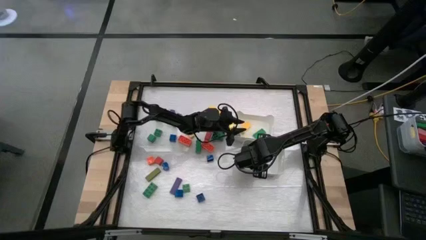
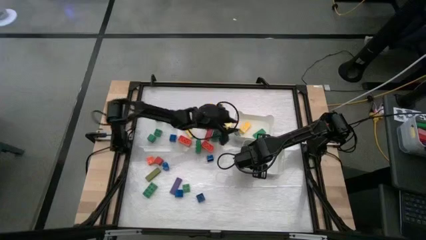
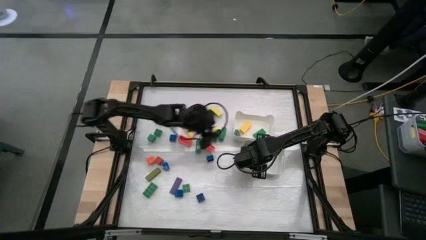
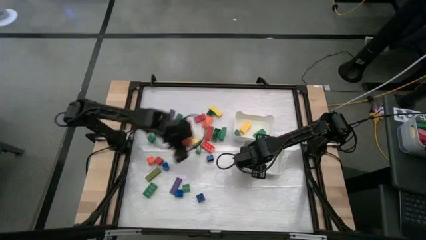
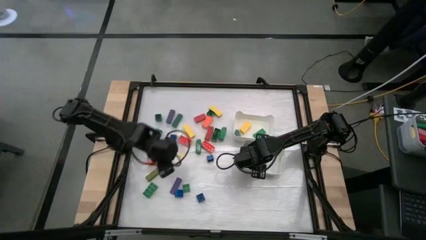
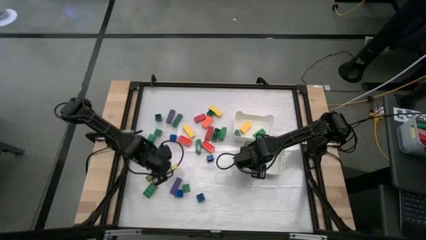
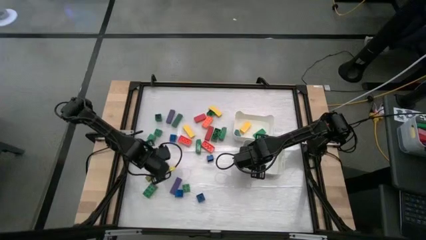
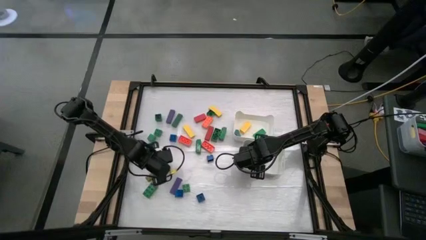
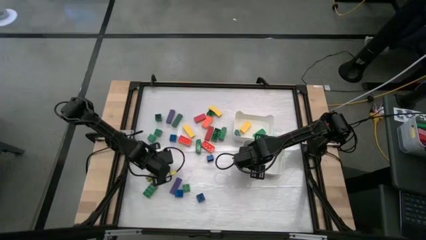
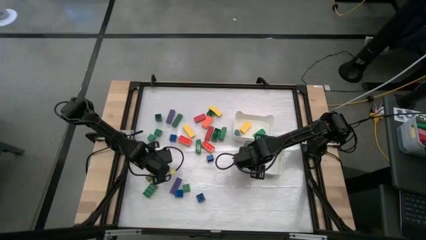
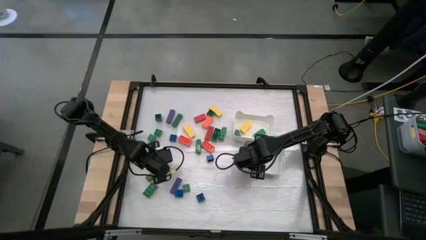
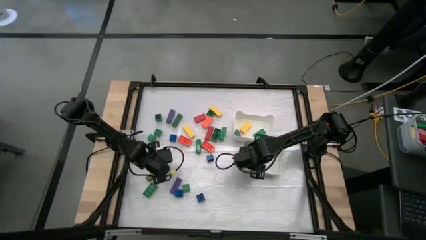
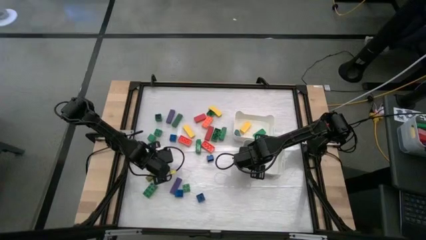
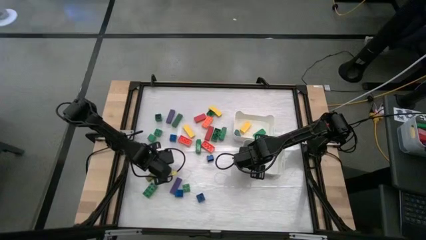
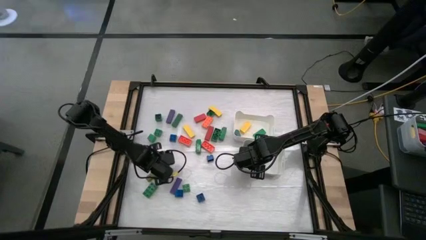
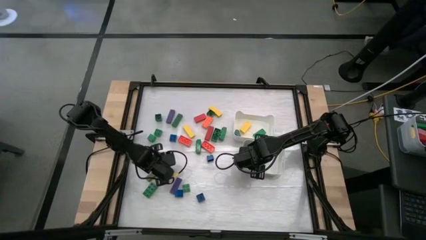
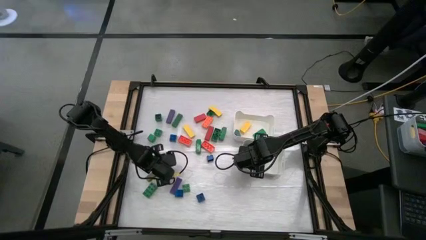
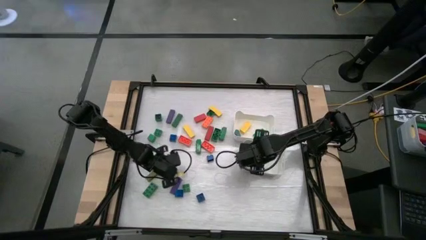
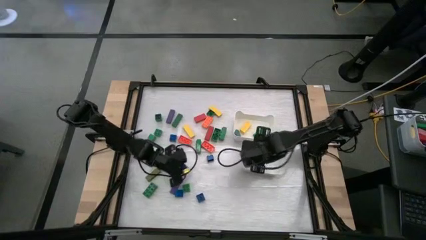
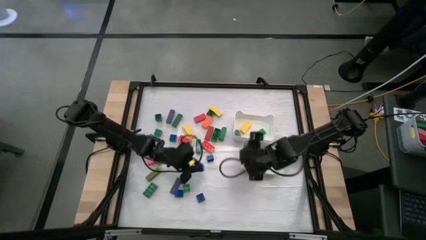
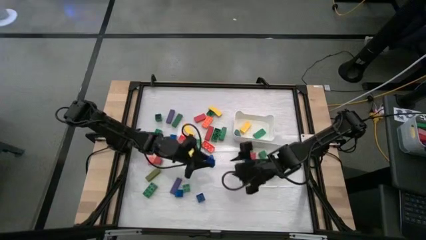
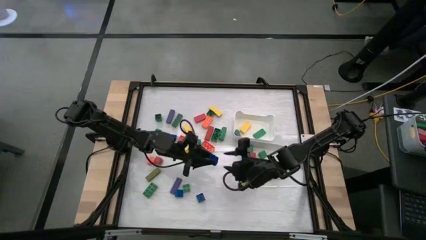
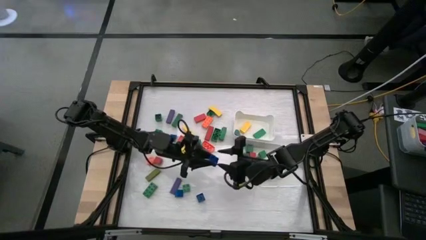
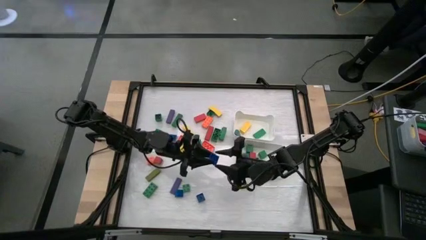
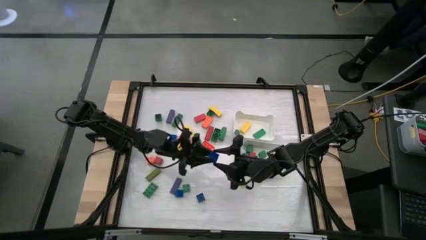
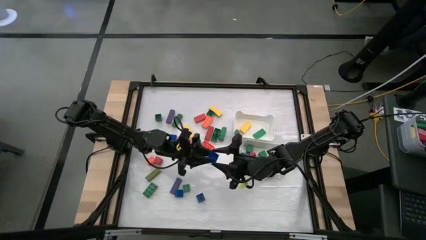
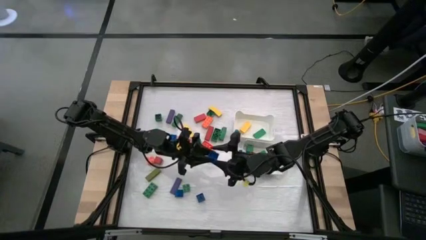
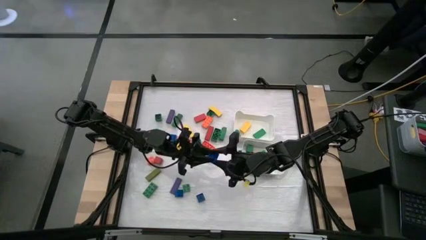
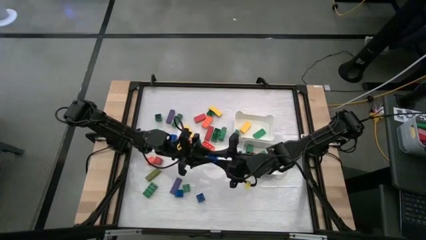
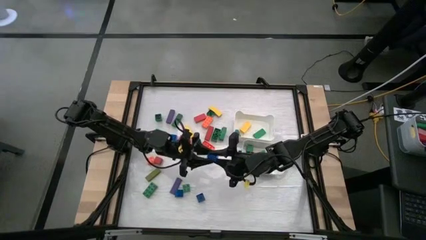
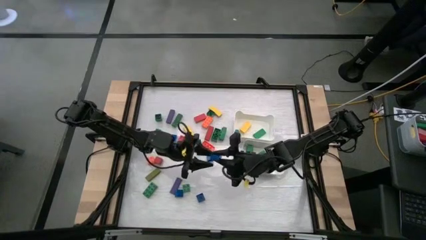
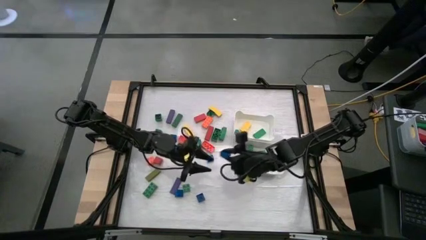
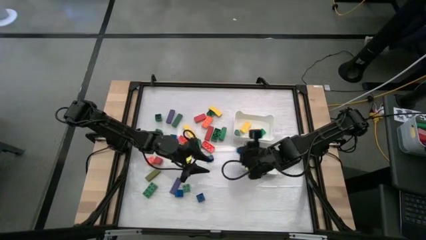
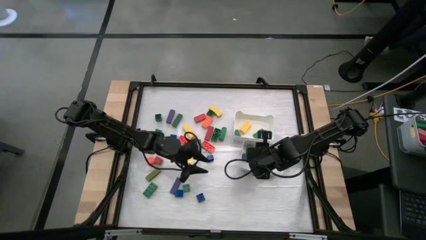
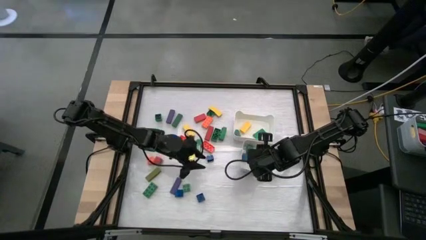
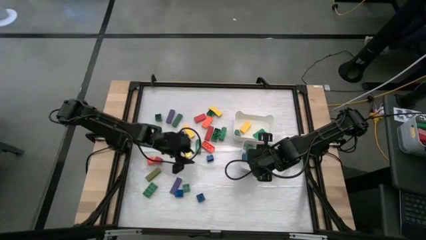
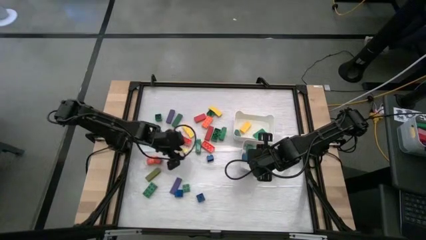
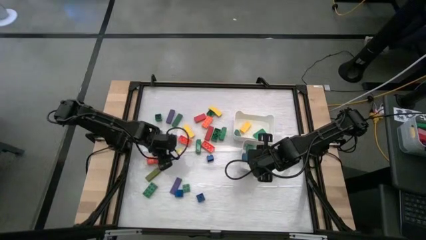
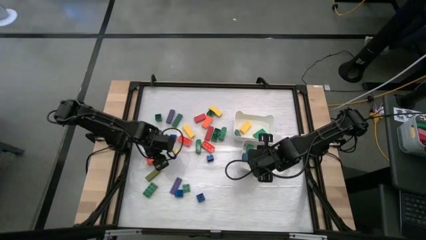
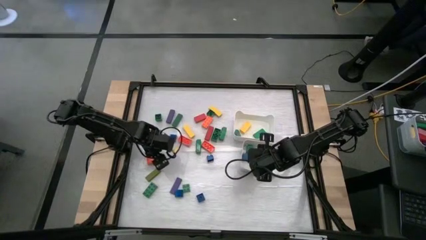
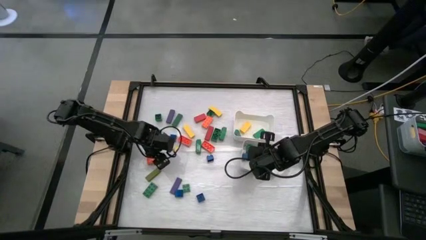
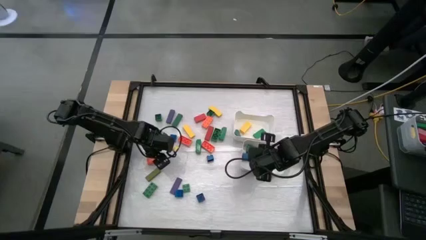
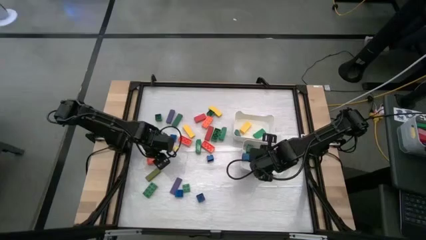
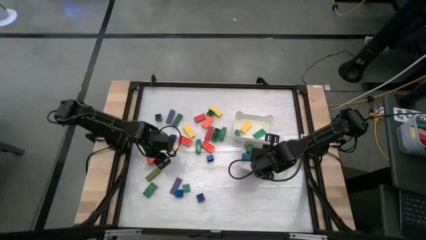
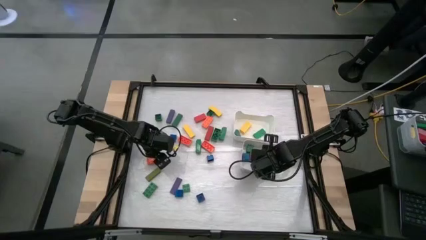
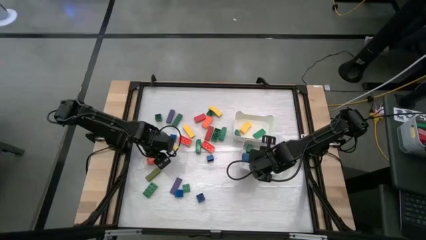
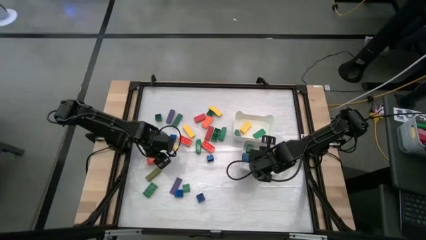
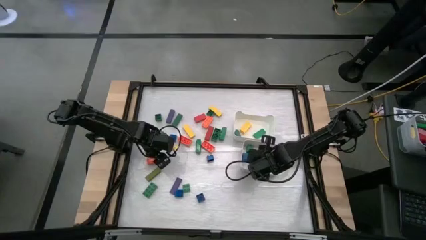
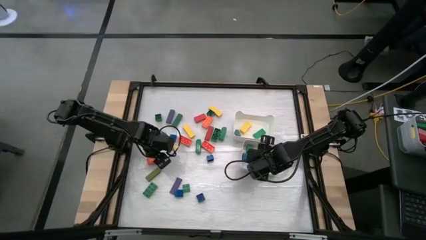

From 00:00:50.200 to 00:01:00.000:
Task: Sort blocks by size
Put the blue cube game piece into the bottom white bin

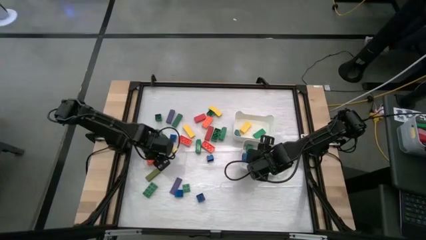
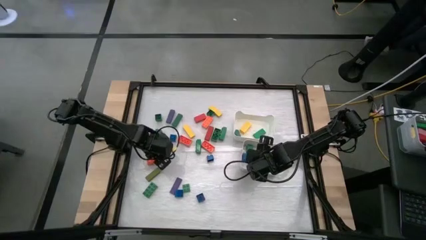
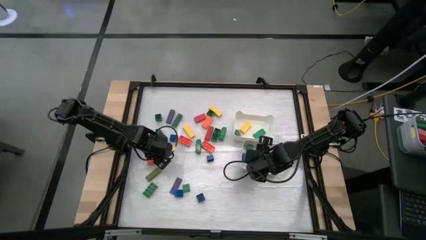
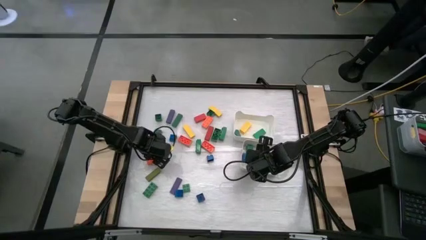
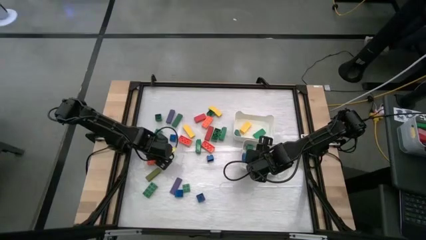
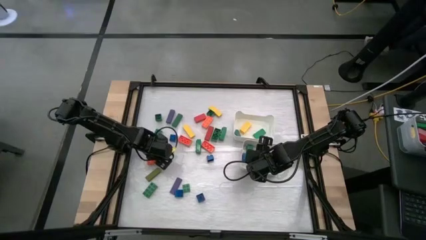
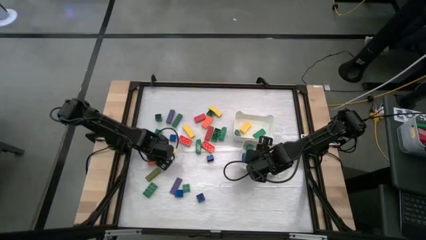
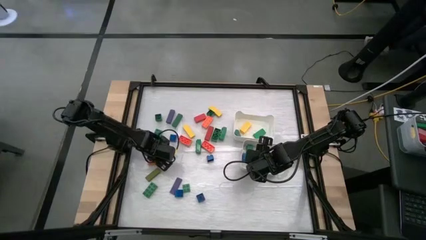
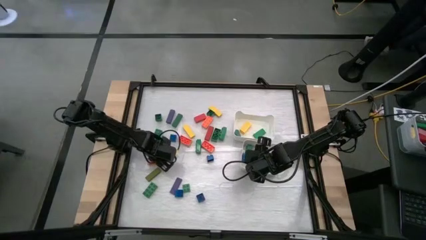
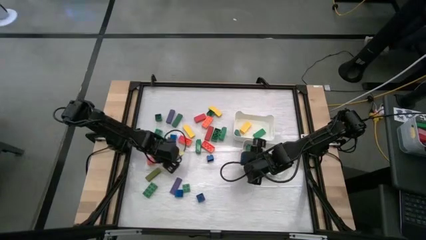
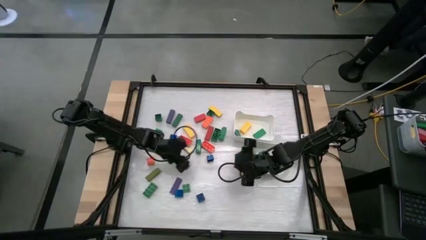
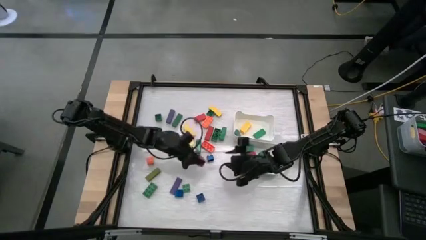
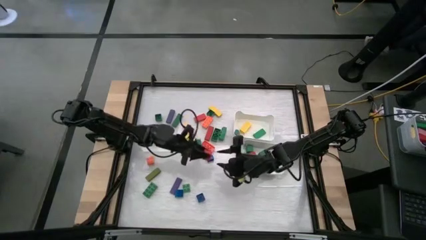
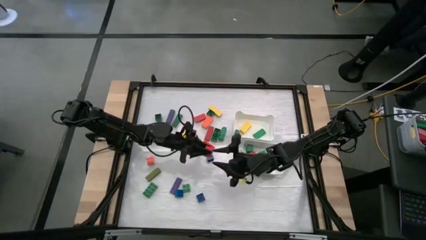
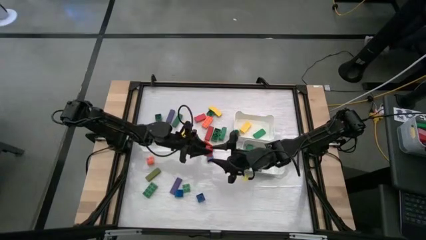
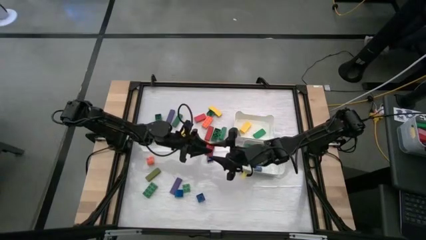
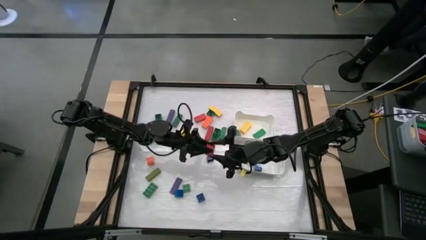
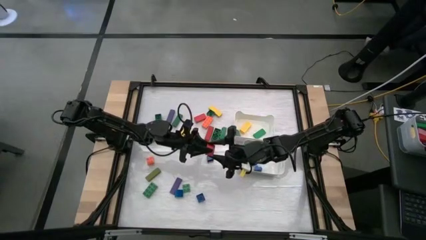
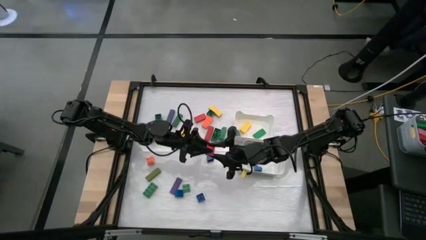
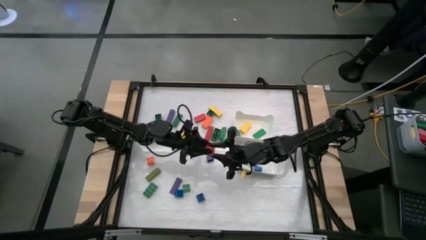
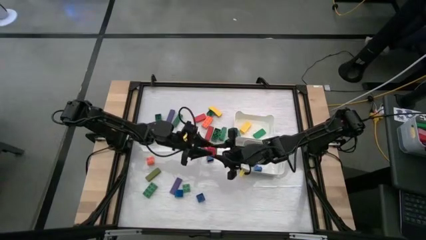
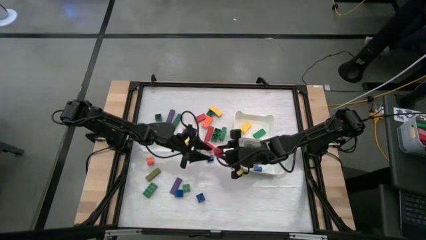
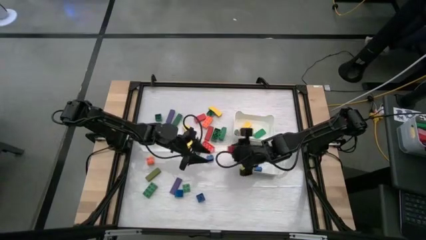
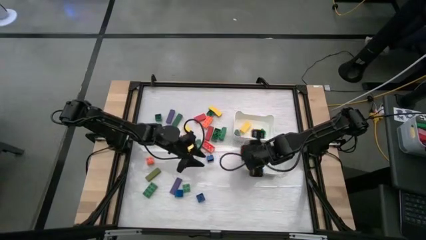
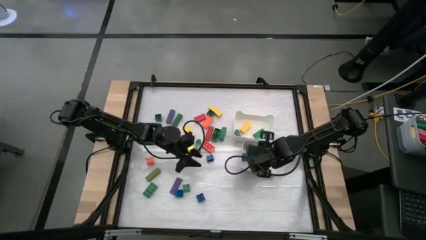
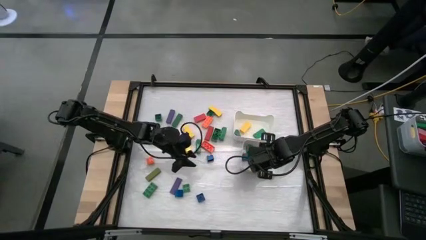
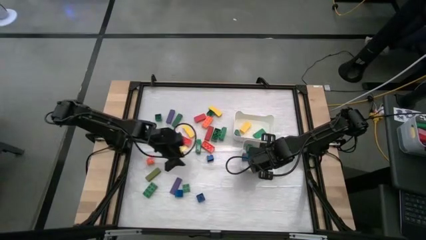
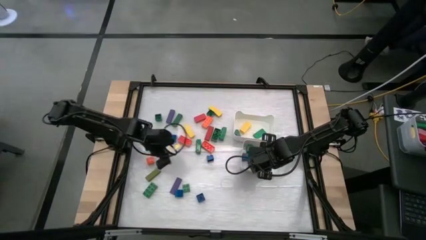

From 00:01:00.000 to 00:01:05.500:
Put the red cube block into the bottom white bin

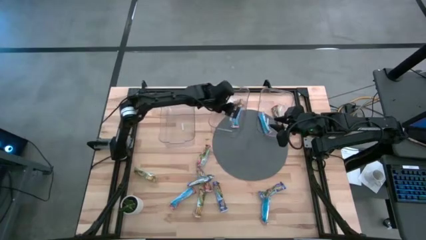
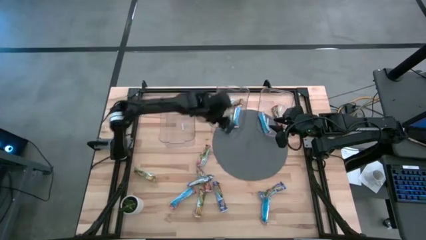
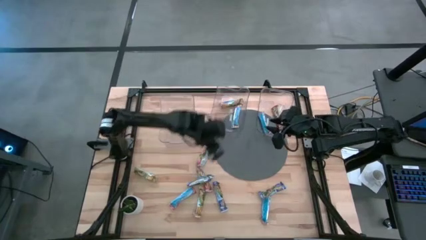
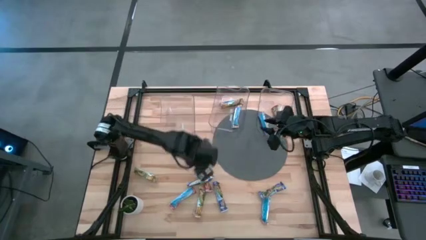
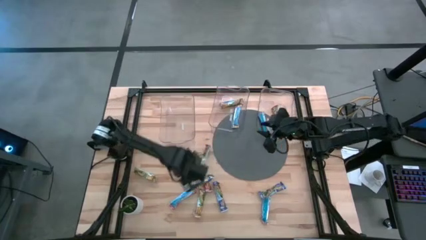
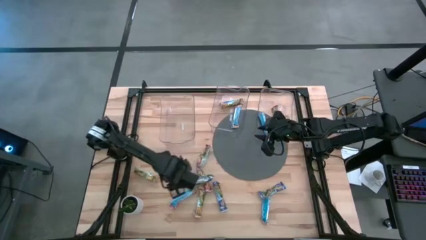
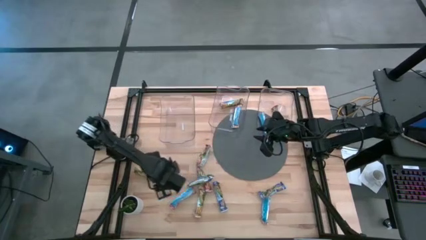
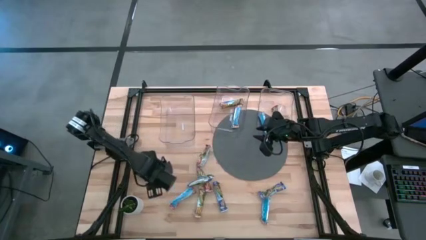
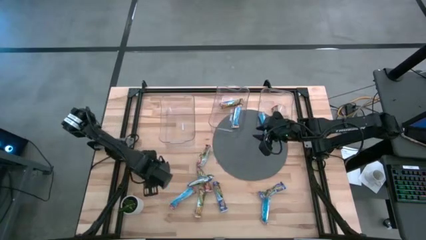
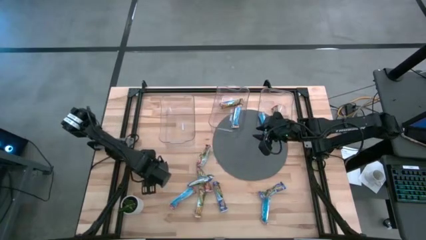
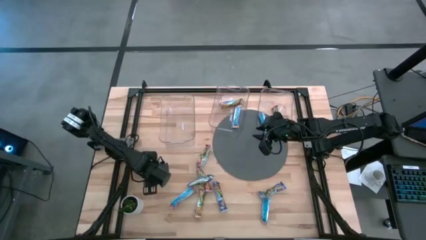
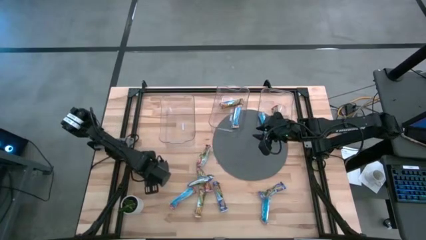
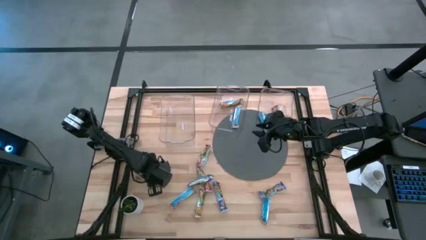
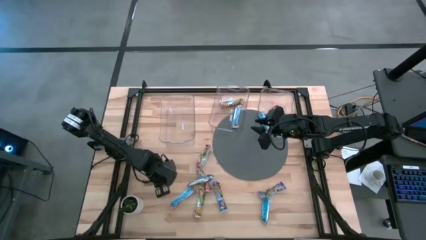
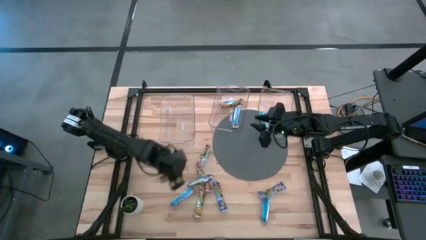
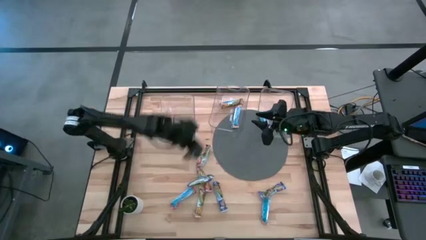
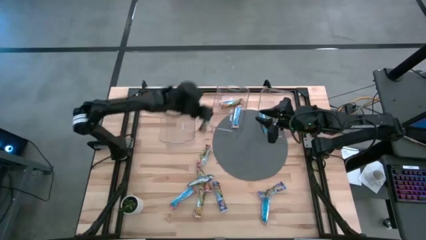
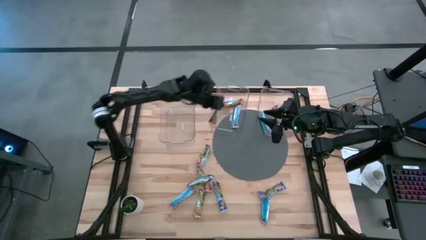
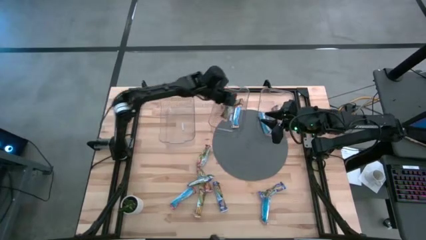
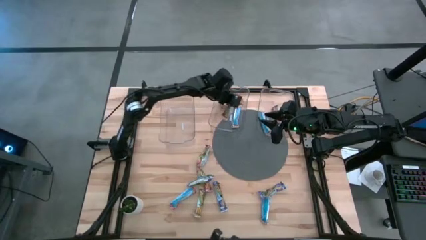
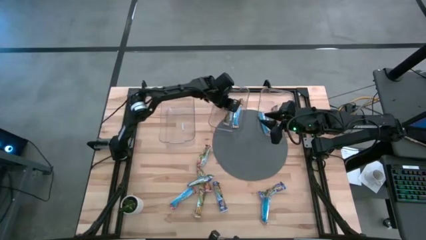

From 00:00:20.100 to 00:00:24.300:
Task: Pick and place Granola Bars by type
Put the yellow granola bar into the middle transparent bin
